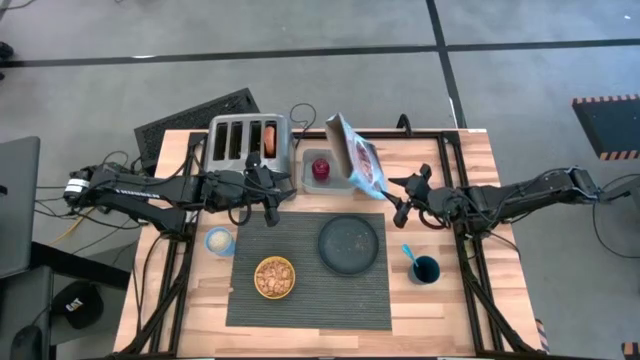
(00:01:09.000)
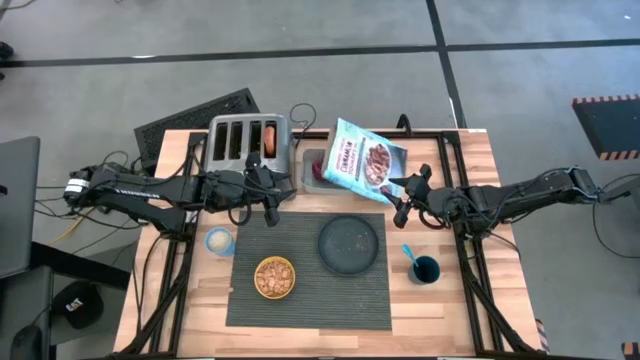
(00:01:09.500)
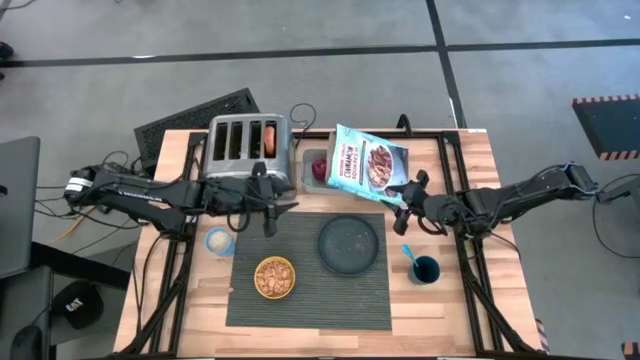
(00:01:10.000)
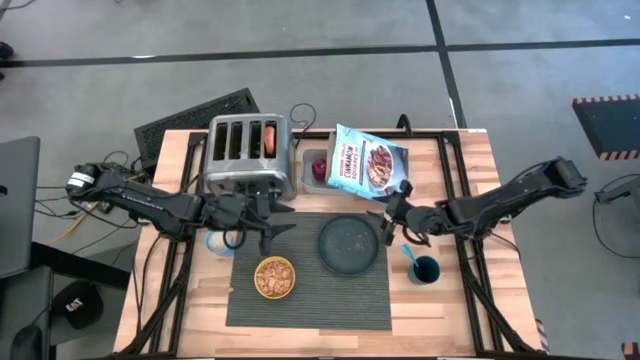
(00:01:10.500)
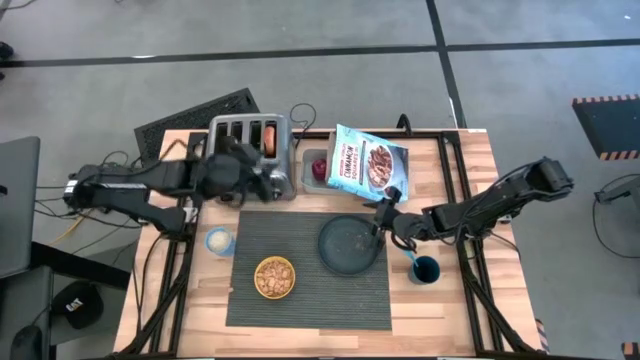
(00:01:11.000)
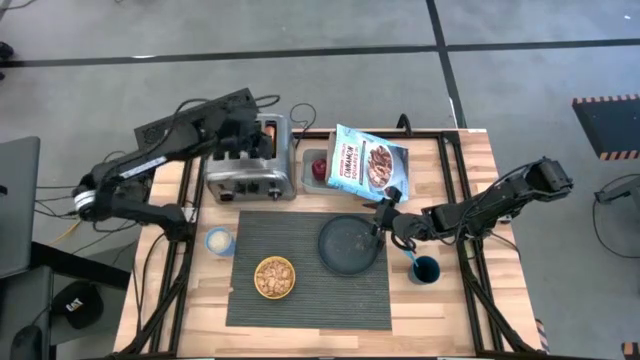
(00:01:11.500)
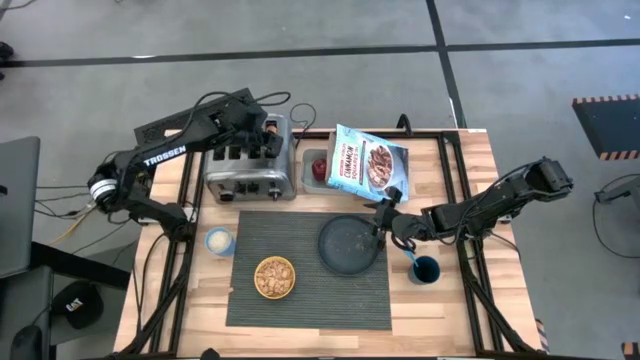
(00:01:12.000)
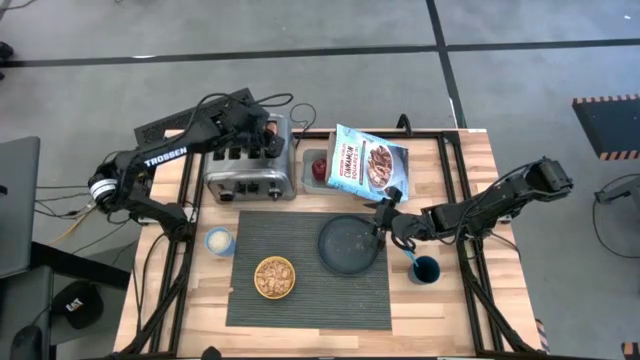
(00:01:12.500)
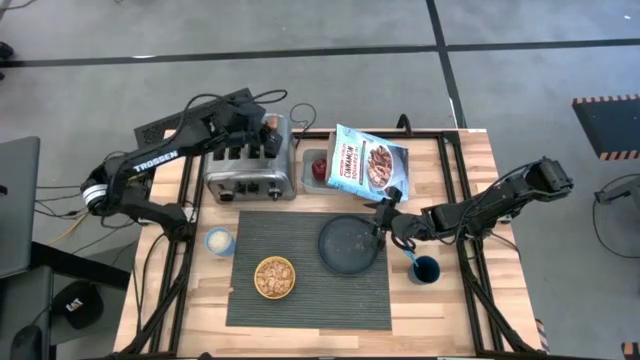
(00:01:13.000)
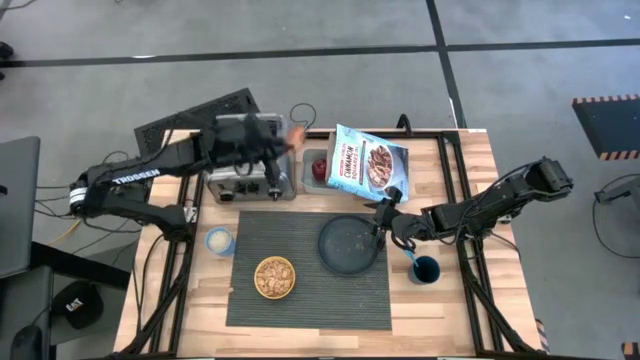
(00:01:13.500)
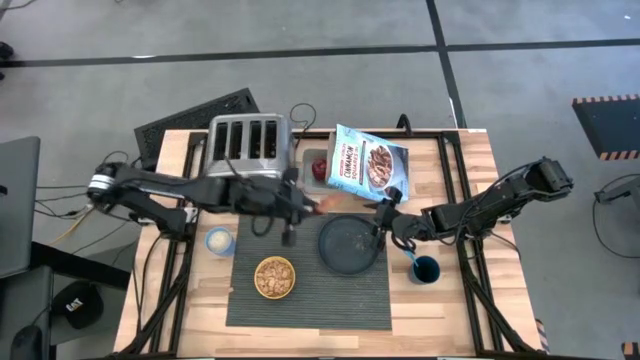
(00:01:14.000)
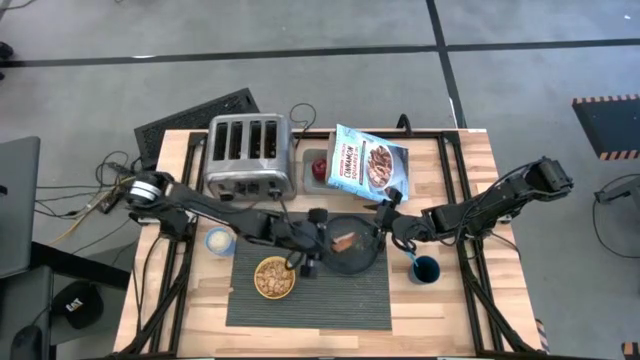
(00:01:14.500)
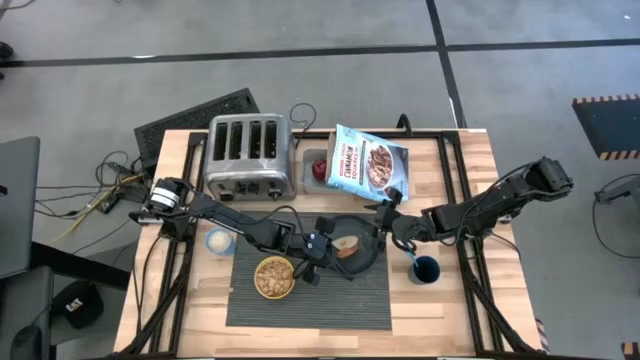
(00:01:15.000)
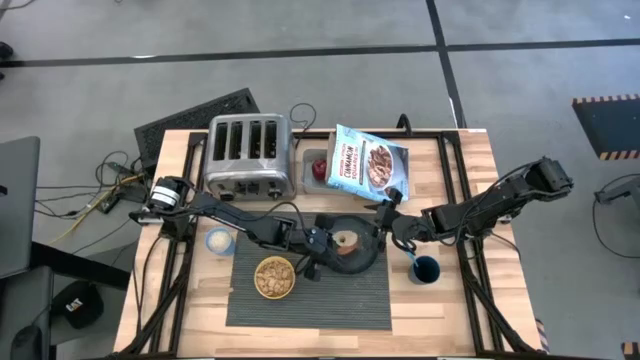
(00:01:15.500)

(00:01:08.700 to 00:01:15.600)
Task: Arrange a breakfast setting
Put the toasted bread on the black plate

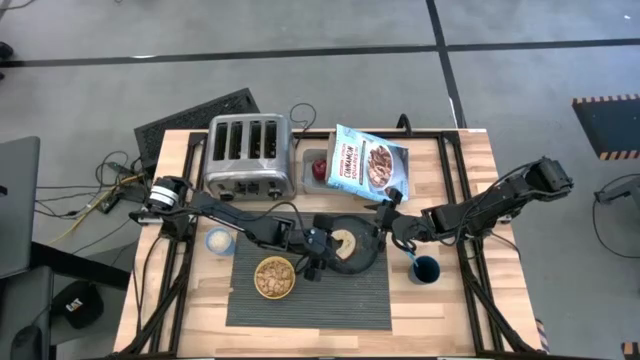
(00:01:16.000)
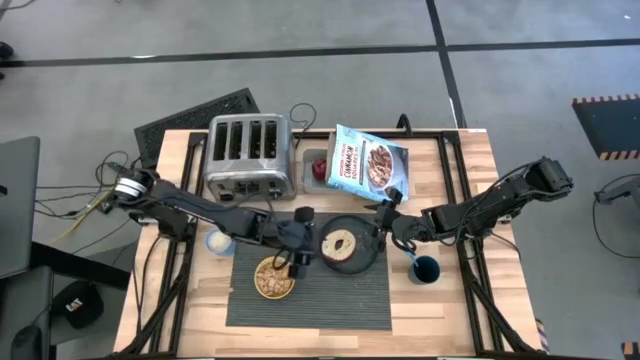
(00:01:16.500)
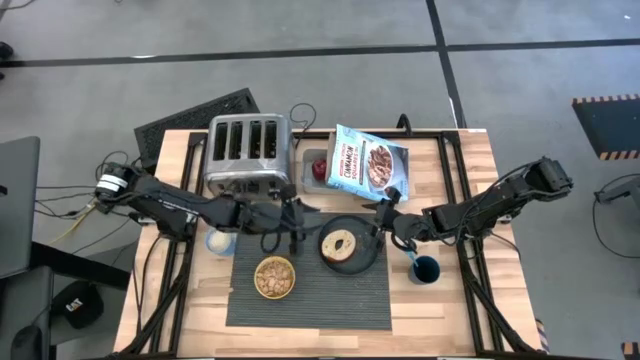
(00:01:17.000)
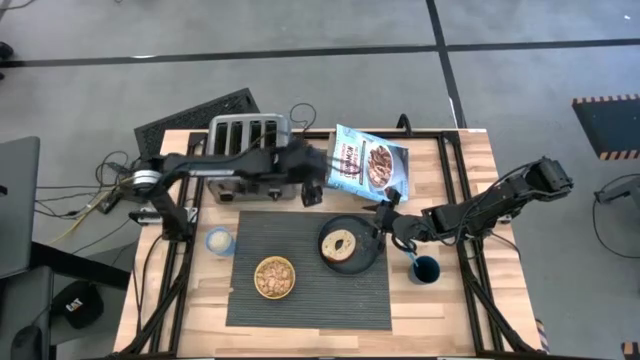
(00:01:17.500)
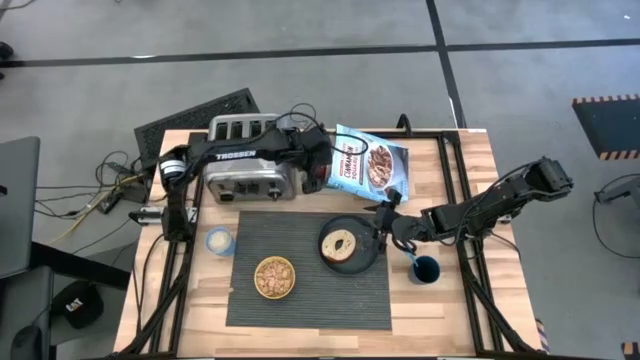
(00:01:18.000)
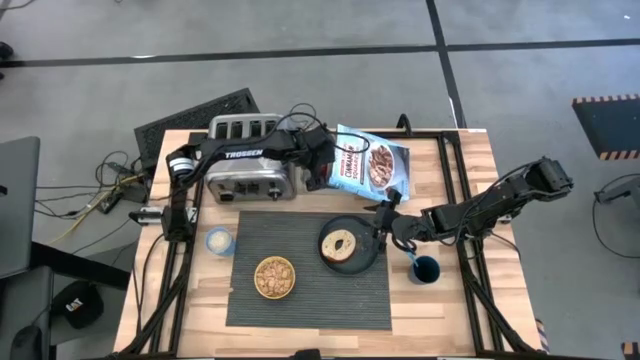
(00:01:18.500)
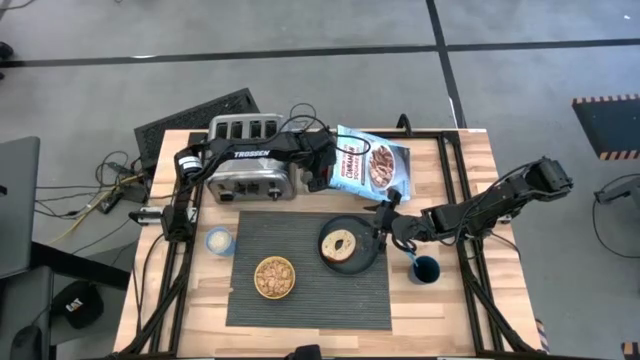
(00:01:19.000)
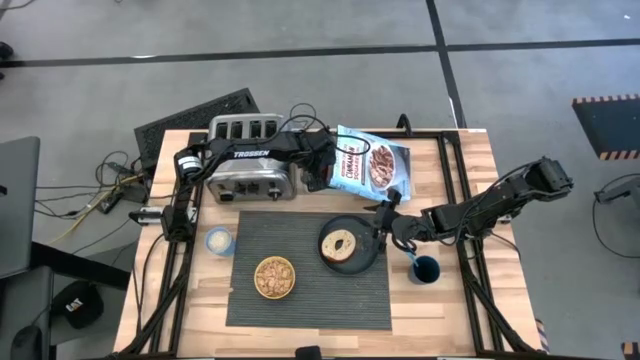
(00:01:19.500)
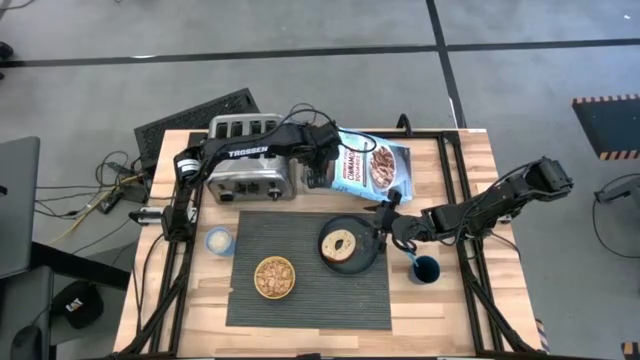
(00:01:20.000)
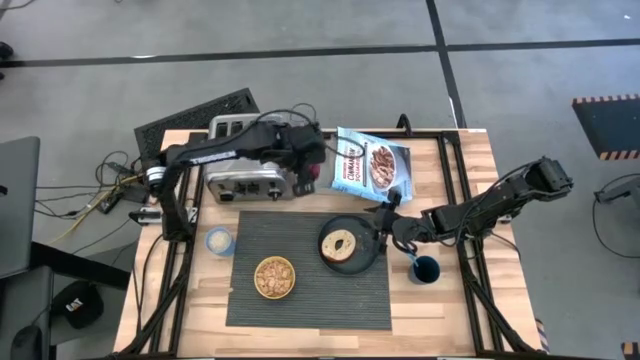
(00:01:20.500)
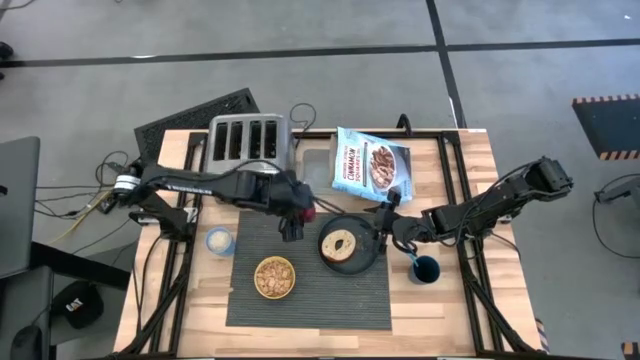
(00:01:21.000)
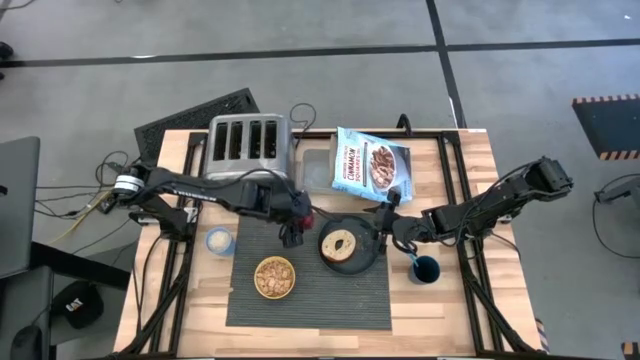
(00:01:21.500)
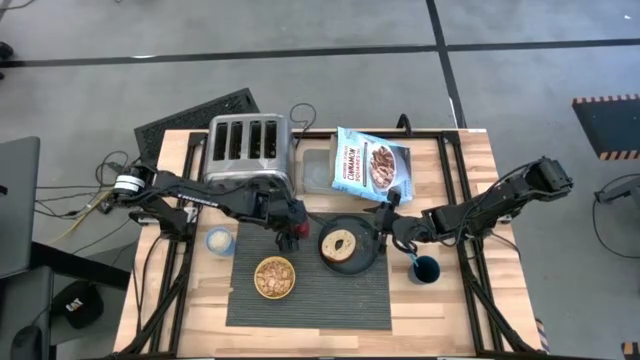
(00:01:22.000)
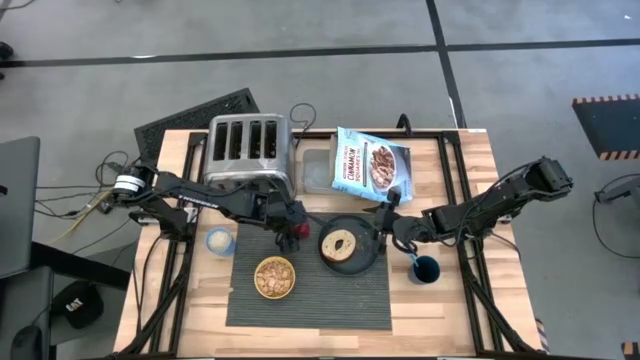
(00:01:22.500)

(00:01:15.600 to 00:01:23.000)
Put the red apple to the left of the black plate

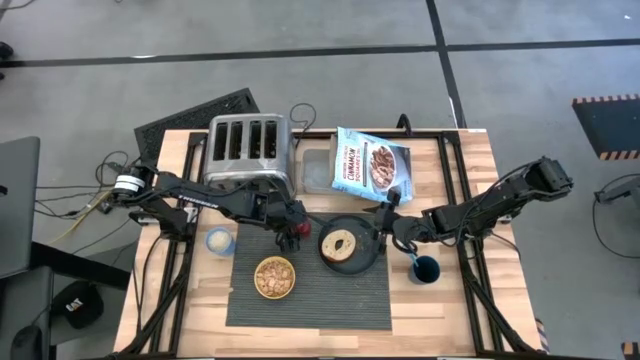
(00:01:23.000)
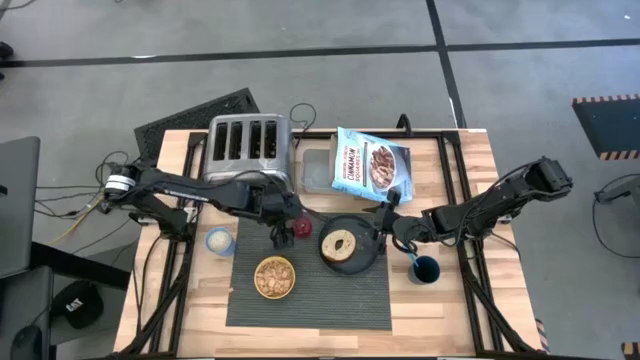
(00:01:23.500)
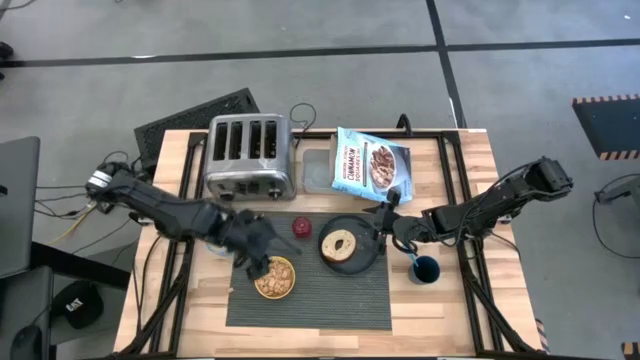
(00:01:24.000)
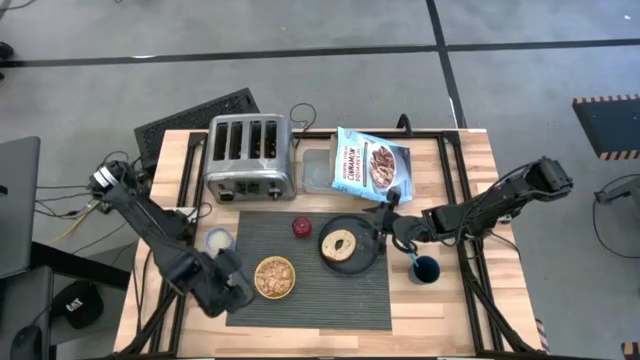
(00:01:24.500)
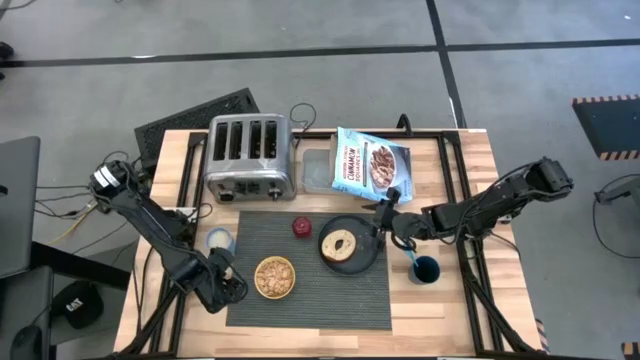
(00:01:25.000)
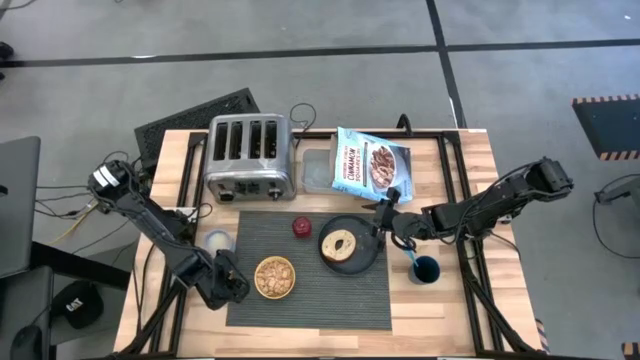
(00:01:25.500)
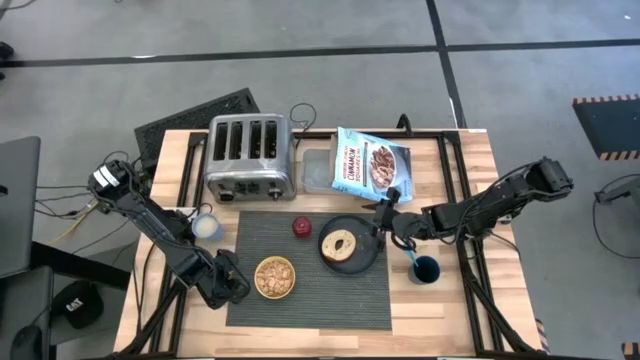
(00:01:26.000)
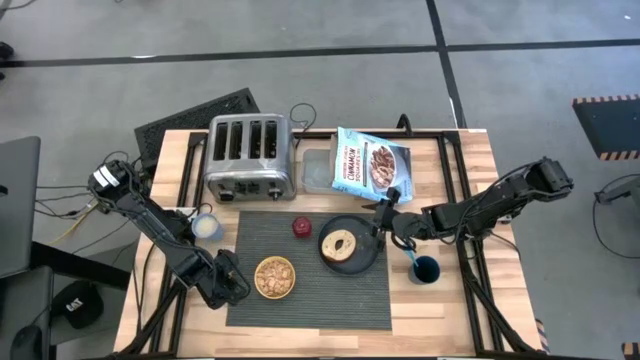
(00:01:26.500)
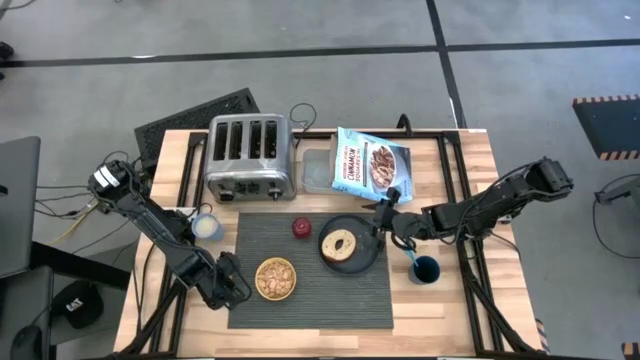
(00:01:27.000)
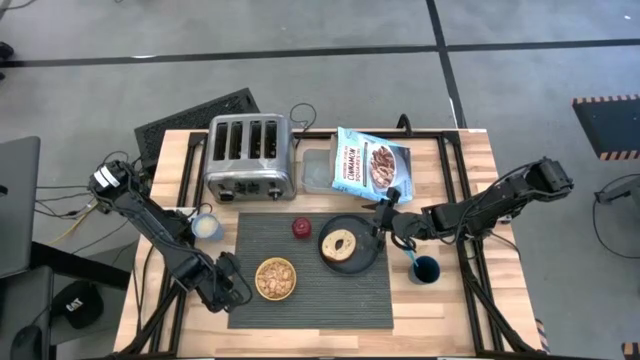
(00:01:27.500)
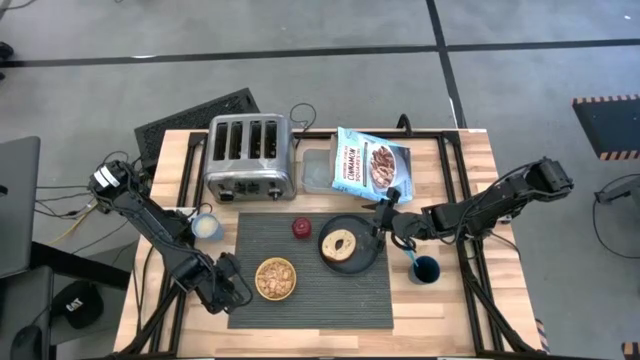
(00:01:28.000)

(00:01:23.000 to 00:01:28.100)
Put the piece of cereal into the yellow patterned bowl

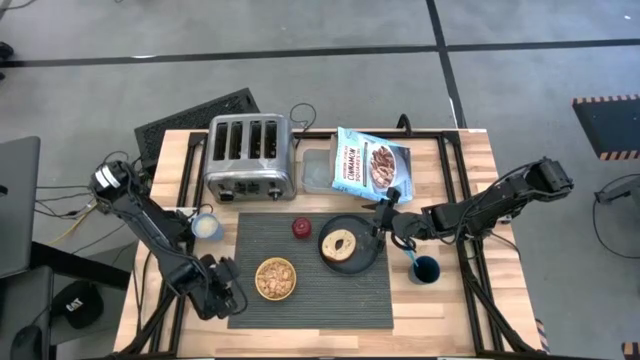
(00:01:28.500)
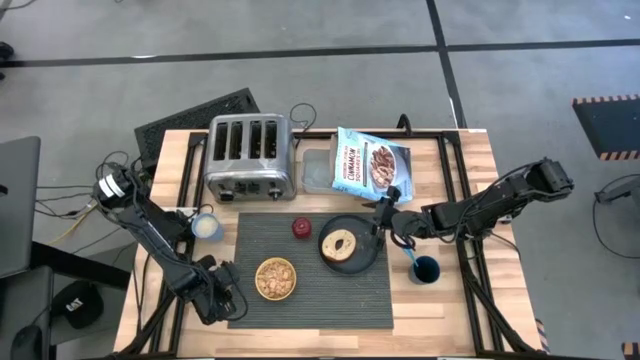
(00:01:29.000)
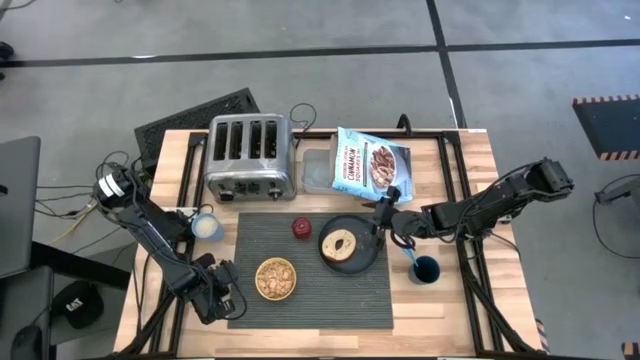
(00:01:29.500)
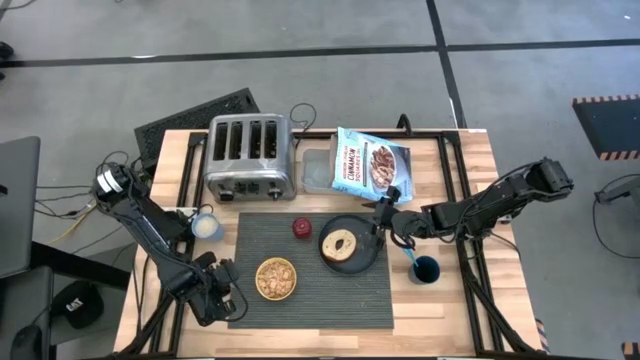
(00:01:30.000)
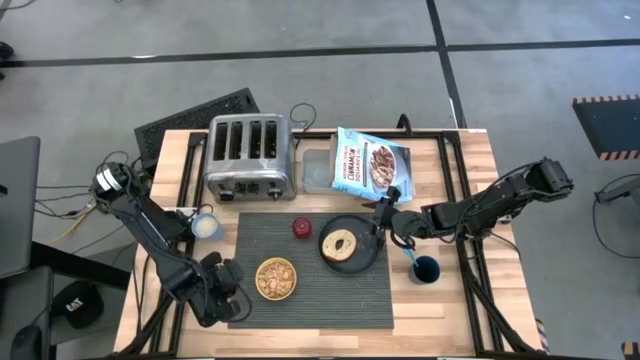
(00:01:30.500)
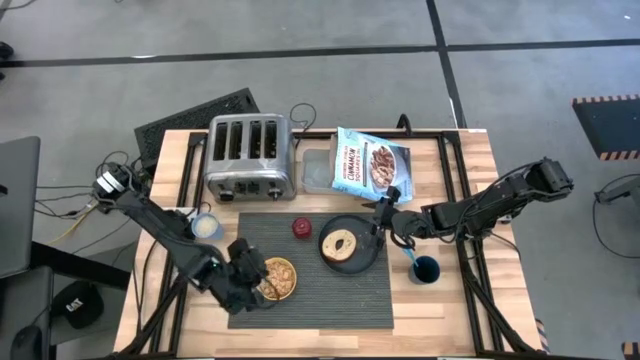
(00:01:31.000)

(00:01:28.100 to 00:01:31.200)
Put the piece of cereal into the yellow patterned bowl
